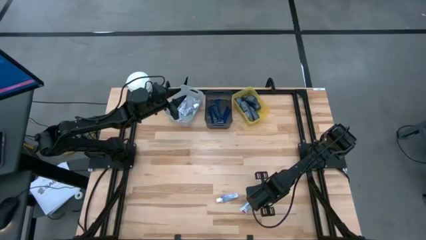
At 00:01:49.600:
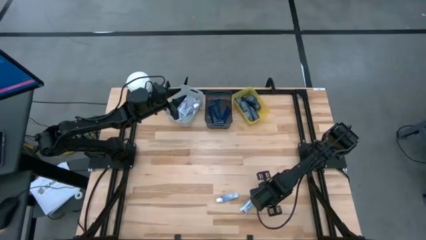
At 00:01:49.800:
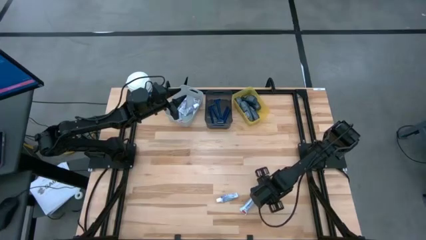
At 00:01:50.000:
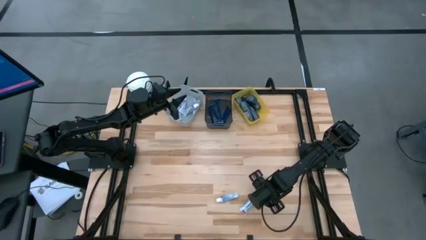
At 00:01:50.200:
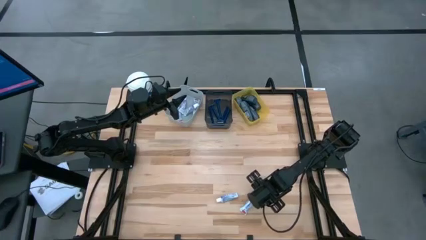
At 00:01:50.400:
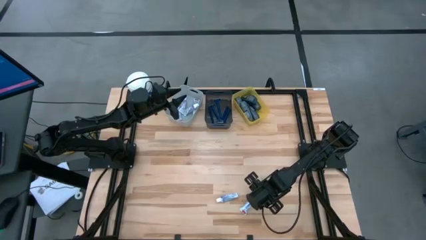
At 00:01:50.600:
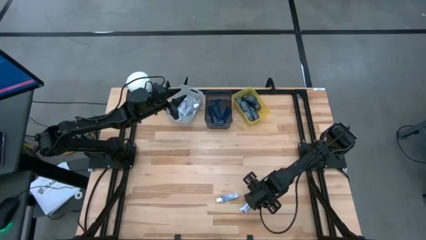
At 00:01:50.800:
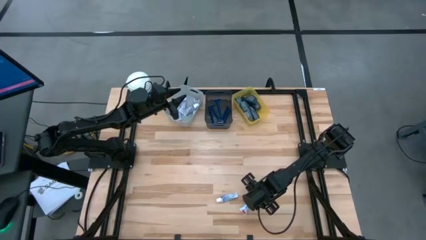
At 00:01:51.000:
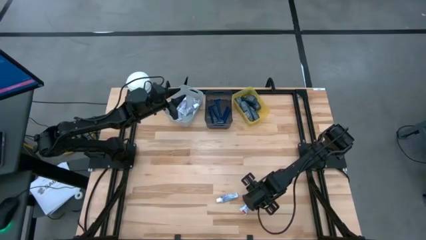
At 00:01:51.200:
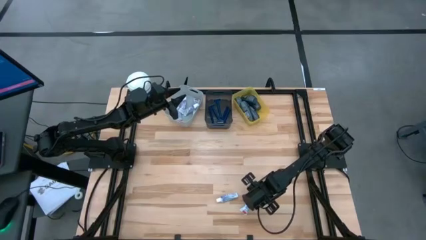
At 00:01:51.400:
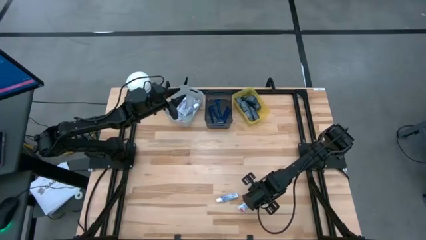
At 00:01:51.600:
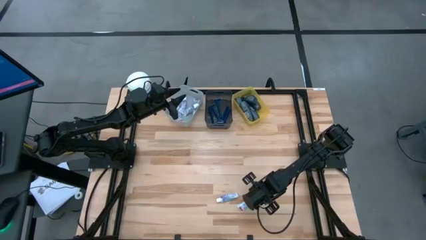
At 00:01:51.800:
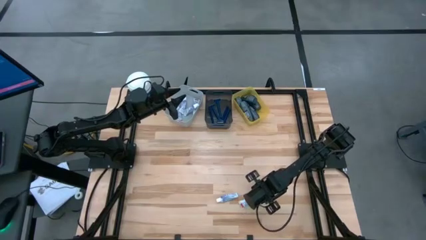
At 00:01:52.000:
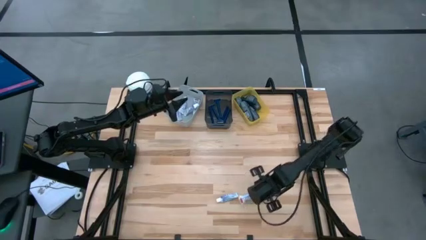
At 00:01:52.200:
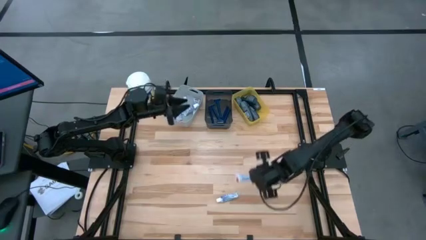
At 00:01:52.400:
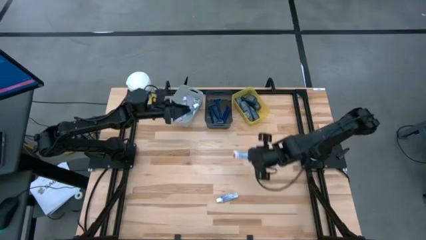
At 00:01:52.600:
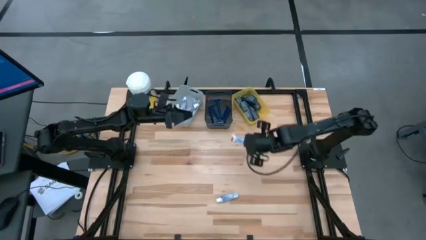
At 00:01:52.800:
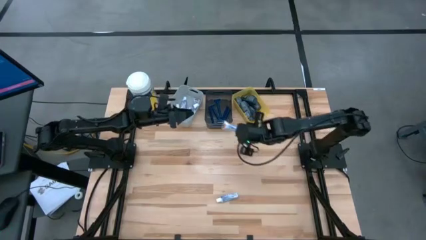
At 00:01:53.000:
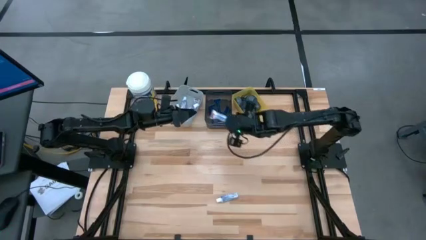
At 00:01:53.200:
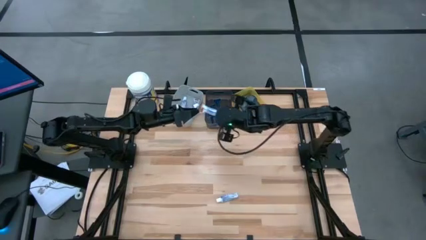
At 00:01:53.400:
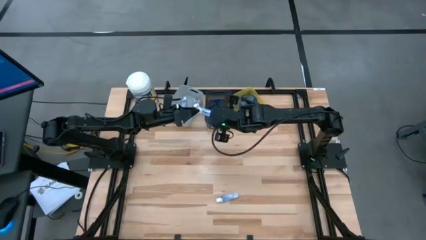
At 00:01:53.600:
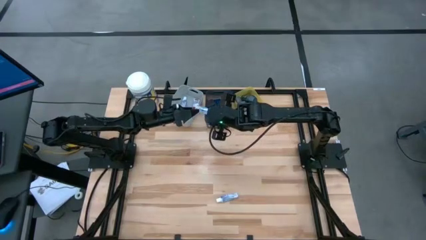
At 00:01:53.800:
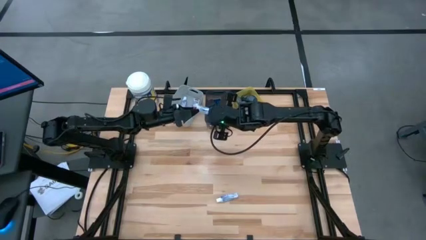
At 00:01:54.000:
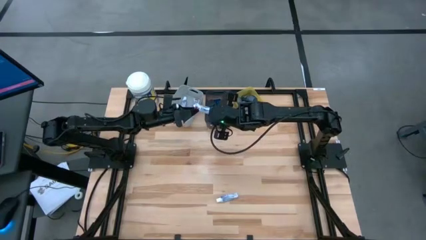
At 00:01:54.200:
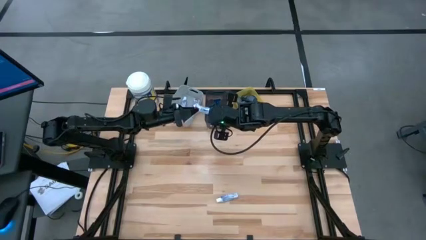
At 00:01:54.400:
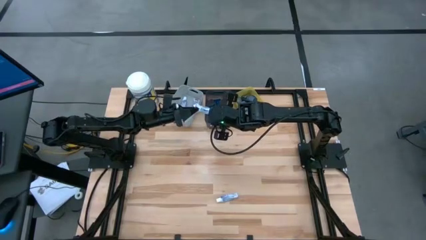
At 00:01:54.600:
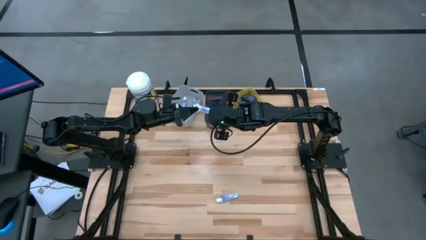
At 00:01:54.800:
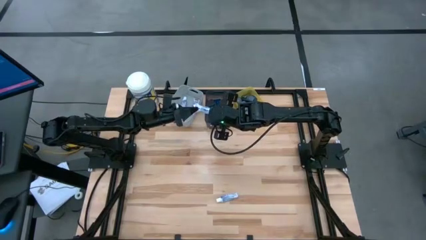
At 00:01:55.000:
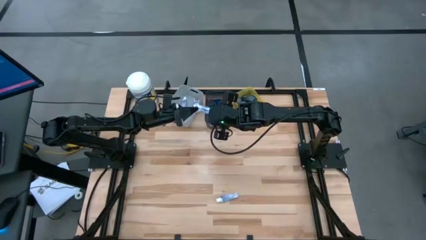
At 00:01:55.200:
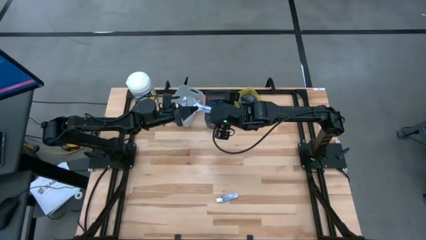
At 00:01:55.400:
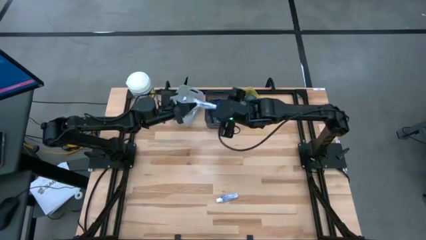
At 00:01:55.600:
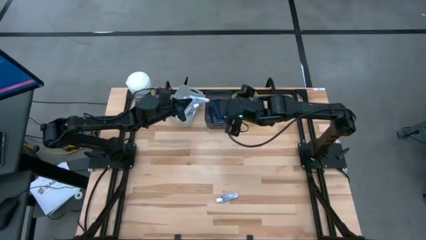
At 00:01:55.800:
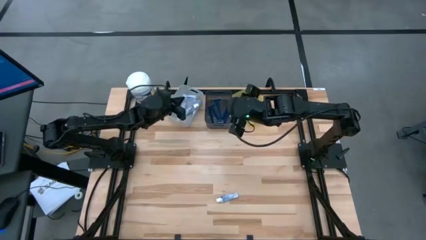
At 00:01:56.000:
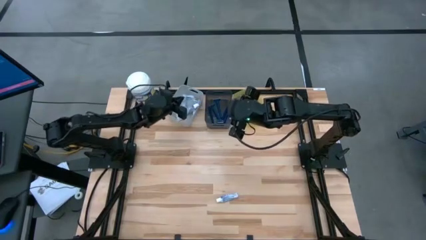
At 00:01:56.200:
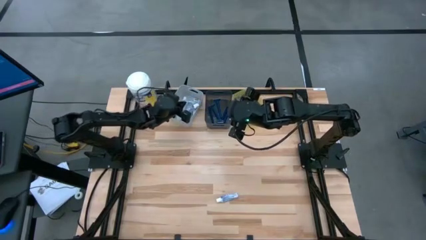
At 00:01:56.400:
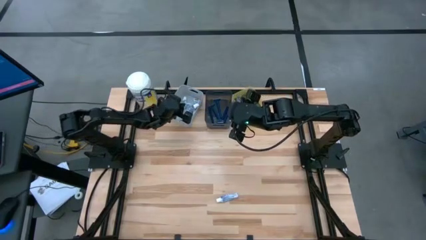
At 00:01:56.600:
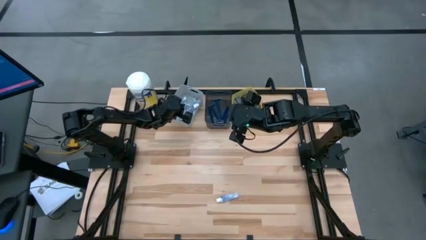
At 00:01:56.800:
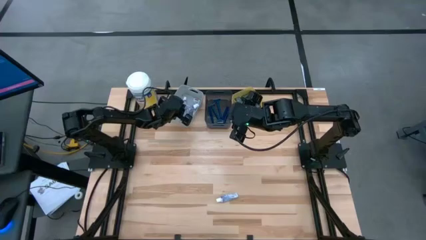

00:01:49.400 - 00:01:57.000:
Task: Pick & Place Travel size toiletries
Put the toothpaste into the gray bin

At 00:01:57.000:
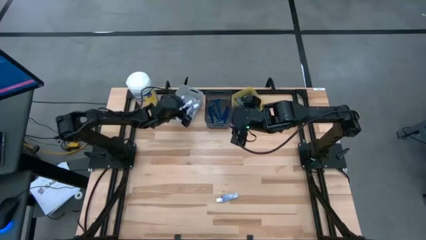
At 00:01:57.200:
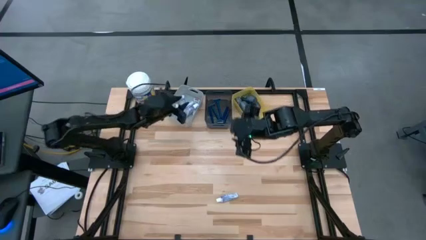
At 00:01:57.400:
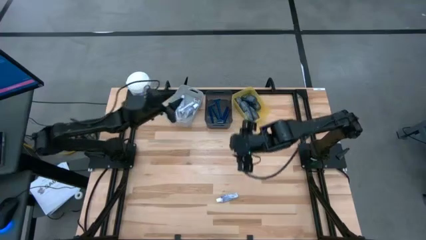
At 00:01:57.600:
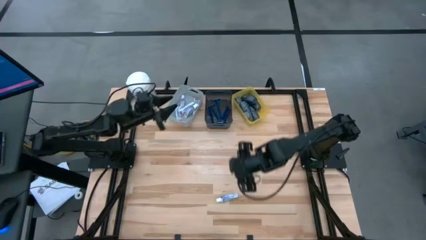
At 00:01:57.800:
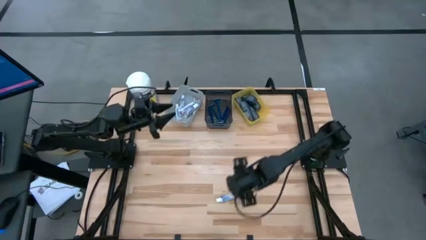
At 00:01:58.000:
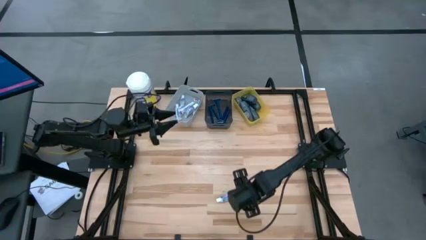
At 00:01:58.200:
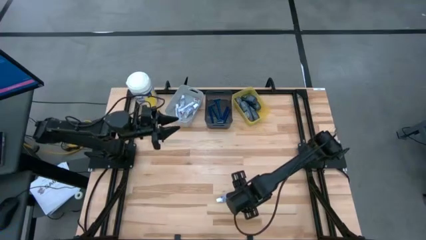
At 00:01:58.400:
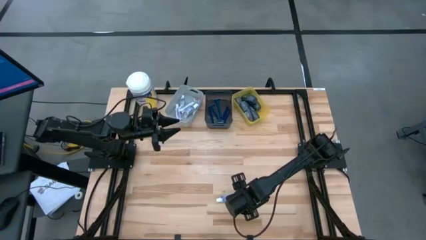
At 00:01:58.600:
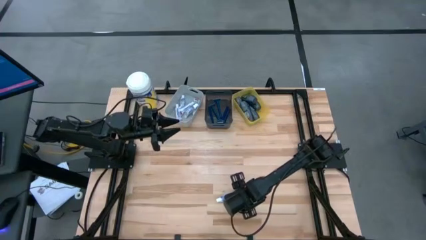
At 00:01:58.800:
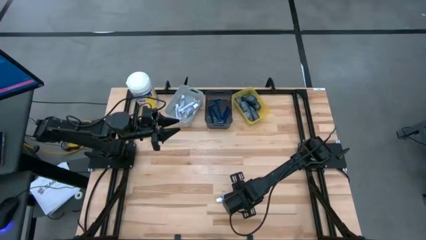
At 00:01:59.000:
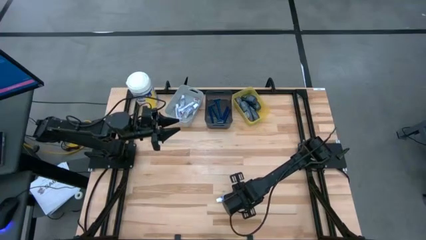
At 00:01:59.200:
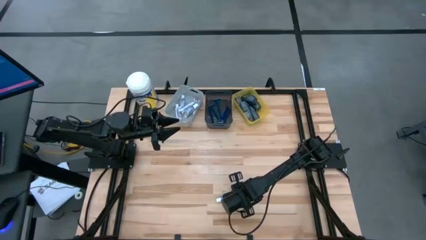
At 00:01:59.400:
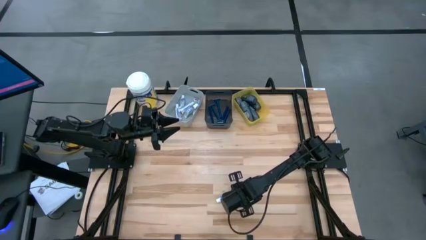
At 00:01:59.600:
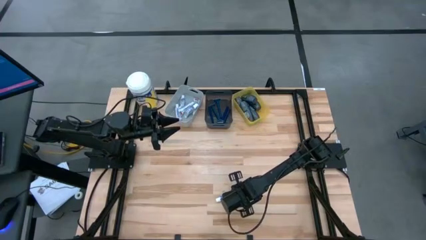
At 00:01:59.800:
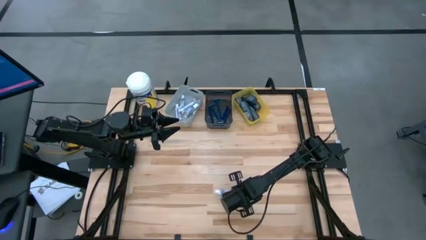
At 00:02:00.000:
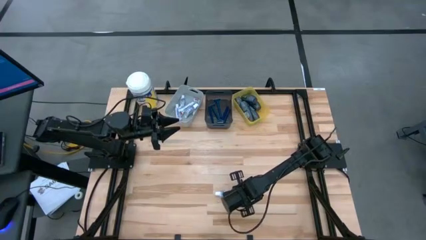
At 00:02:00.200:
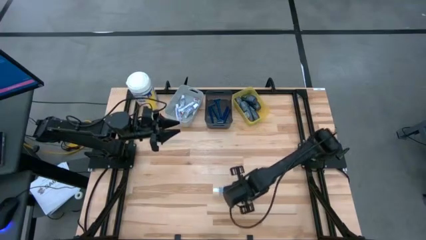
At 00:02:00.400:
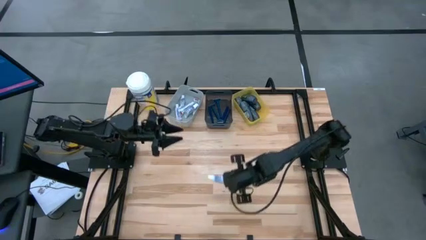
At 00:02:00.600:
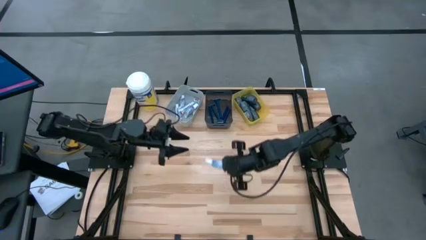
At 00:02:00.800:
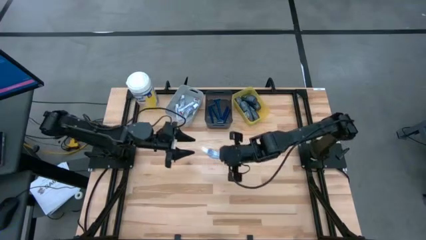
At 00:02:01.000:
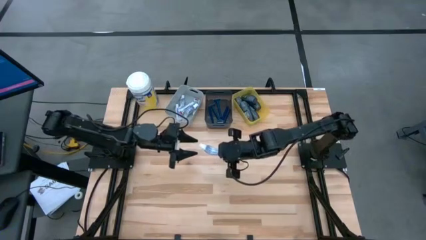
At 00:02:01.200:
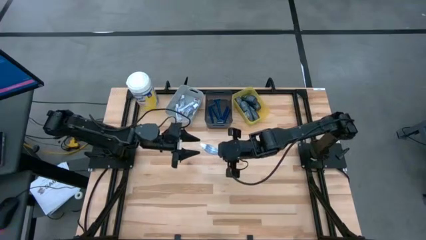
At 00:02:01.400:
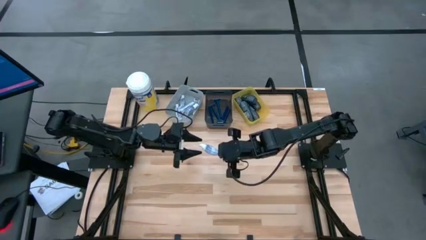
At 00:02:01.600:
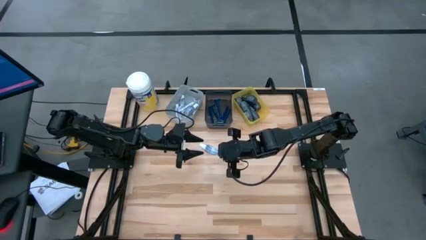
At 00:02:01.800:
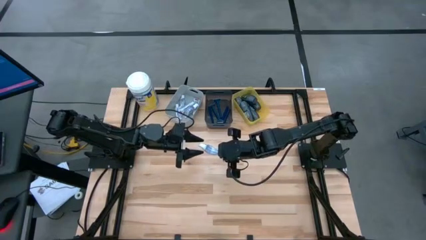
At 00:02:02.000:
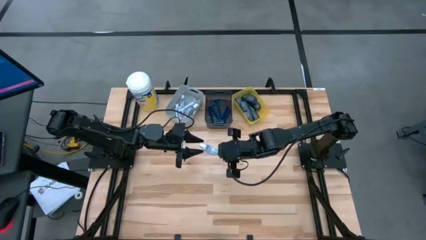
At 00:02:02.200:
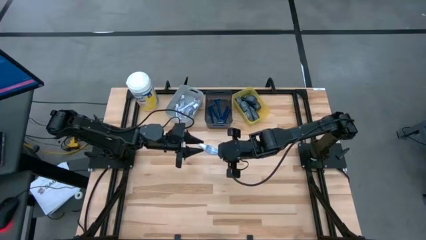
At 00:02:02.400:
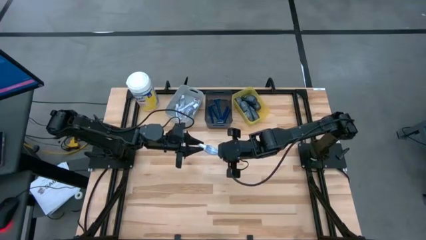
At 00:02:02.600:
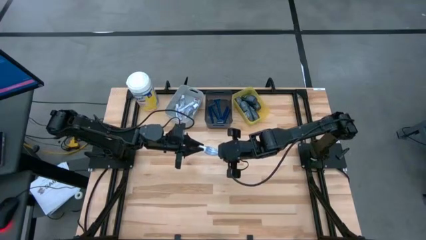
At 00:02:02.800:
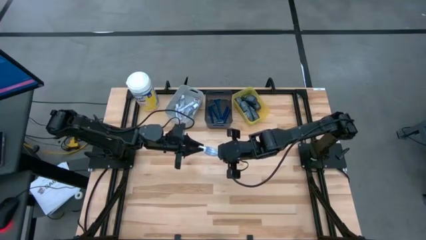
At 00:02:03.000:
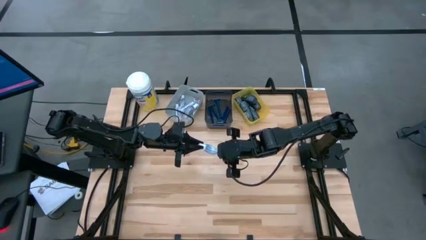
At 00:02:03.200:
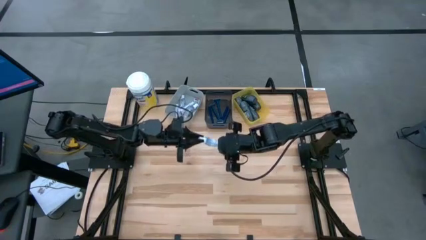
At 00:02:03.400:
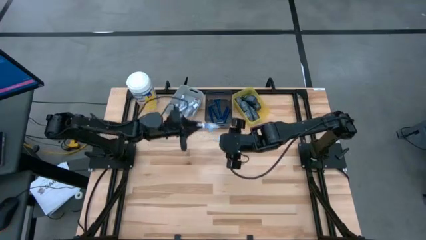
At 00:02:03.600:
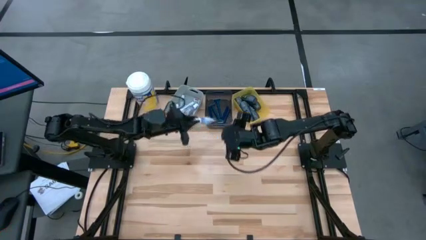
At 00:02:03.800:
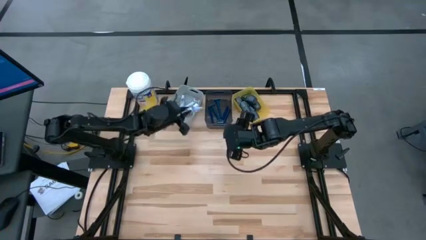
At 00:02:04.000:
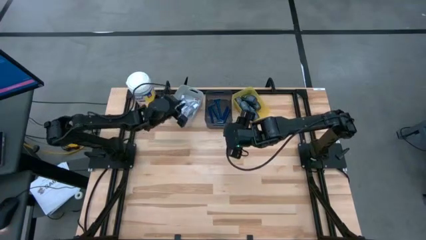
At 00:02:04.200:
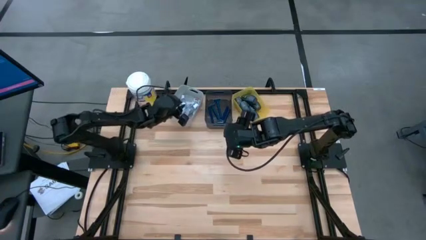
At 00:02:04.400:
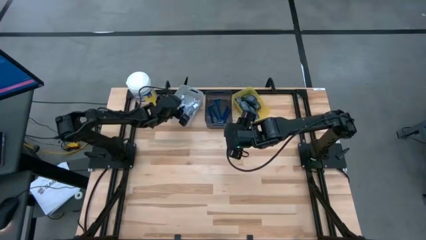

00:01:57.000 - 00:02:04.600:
Put the toothpaste into the gray bin

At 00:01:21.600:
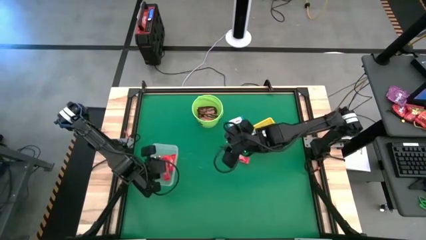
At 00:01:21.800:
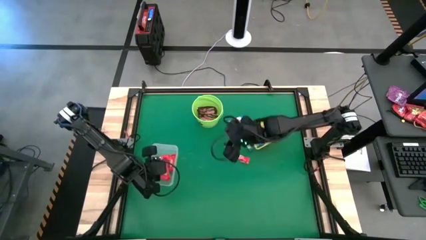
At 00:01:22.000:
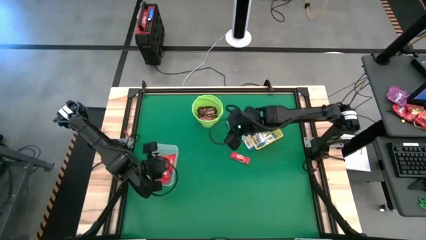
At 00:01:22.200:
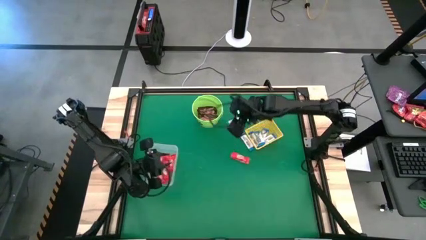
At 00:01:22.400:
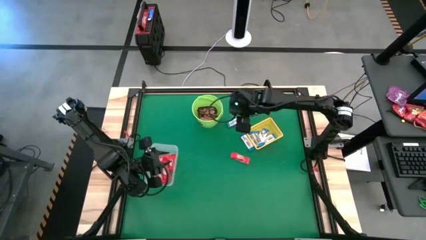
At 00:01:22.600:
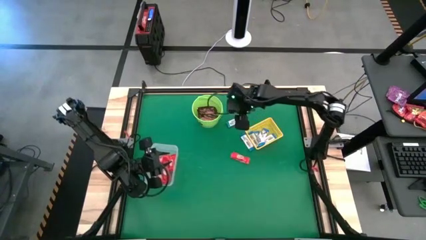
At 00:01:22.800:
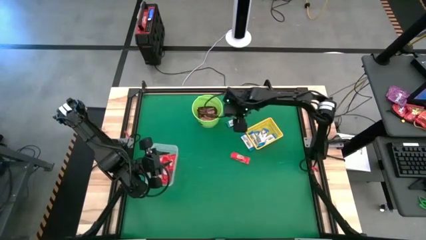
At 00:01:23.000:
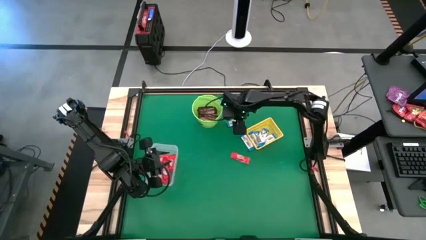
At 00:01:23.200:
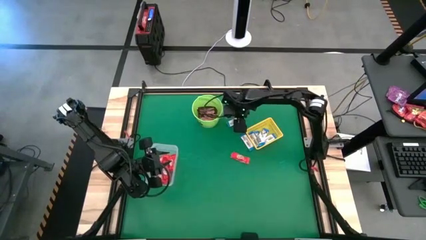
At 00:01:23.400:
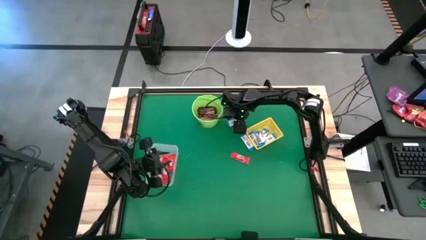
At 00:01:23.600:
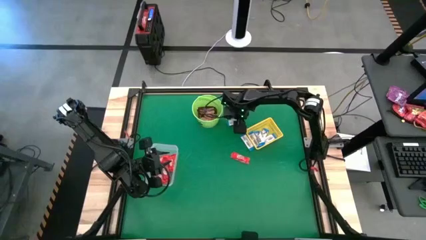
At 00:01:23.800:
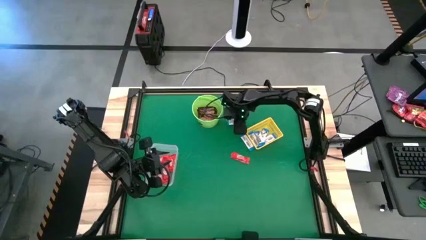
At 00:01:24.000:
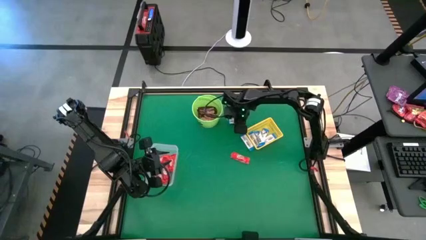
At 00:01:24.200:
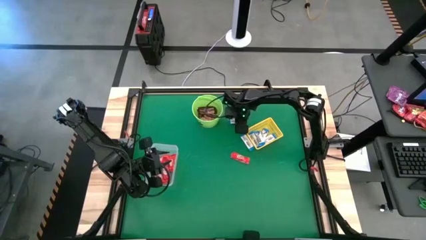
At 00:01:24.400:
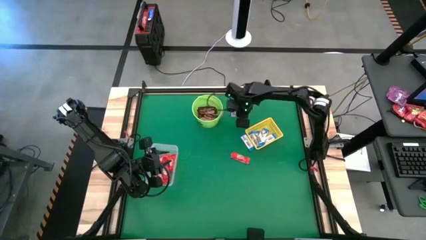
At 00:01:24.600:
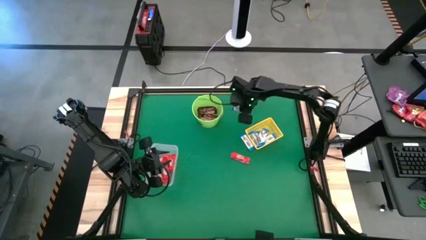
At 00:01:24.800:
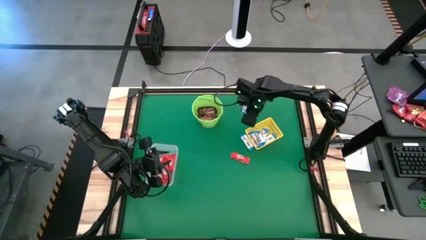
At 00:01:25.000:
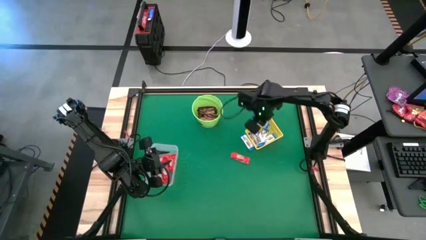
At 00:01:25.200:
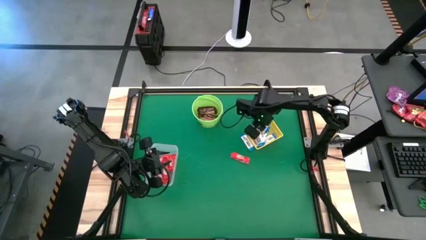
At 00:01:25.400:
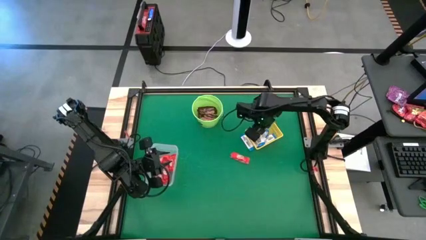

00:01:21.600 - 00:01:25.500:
Task: Sort candy by brand, put in halloween buckets
Put the white chocolate bar into the yellow bin
